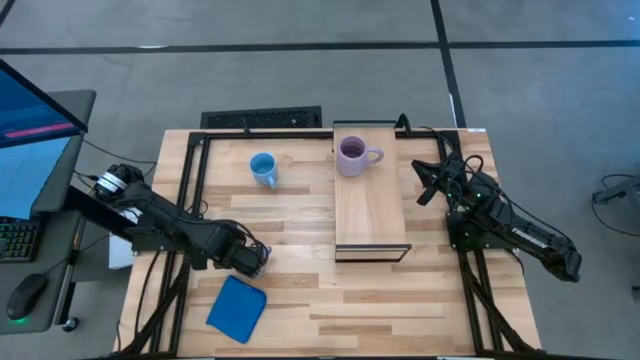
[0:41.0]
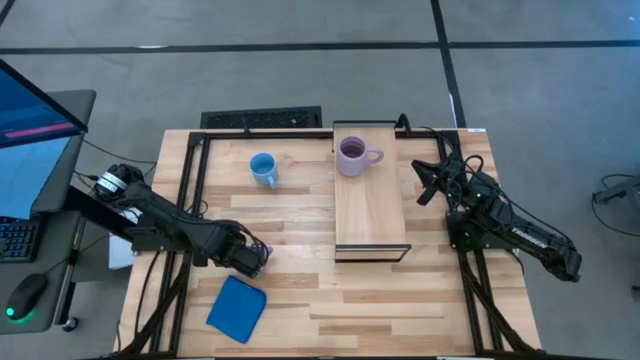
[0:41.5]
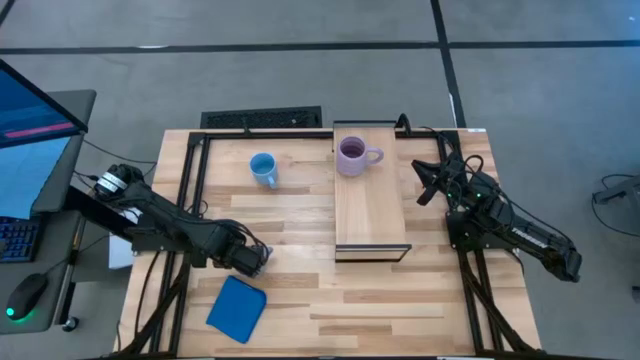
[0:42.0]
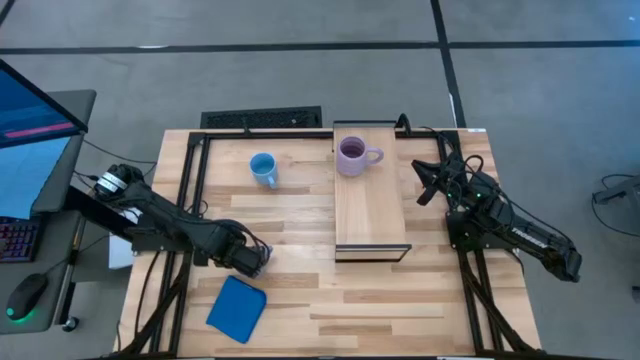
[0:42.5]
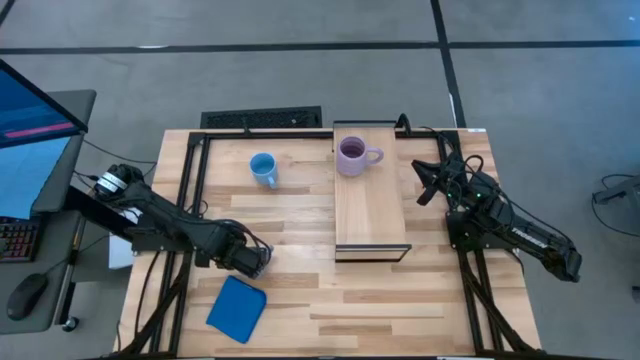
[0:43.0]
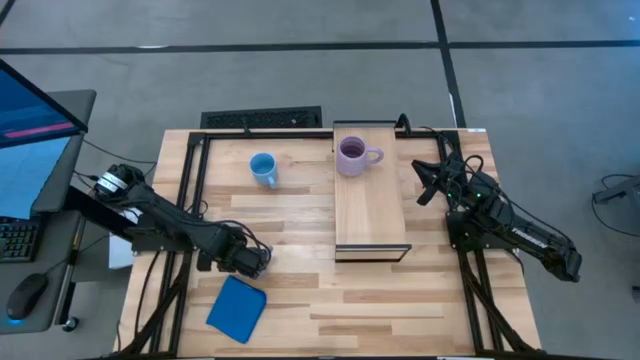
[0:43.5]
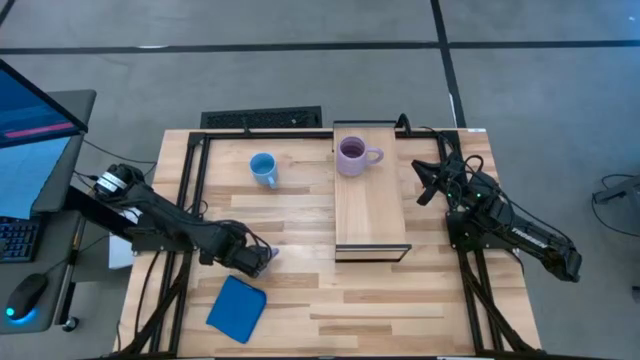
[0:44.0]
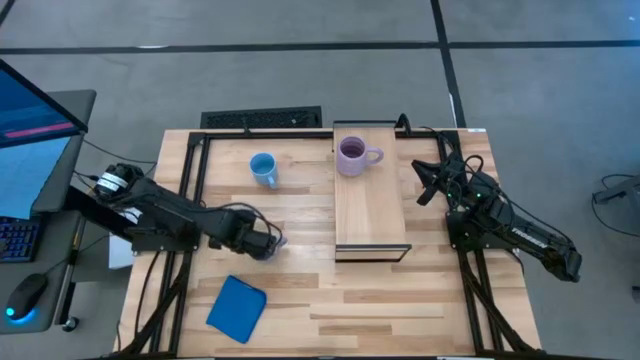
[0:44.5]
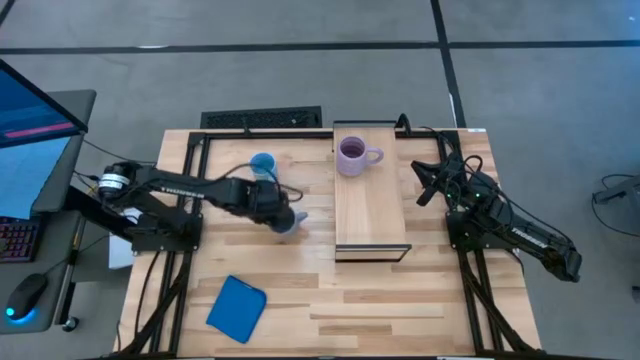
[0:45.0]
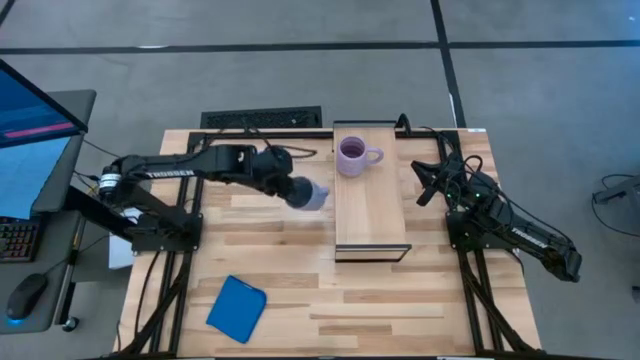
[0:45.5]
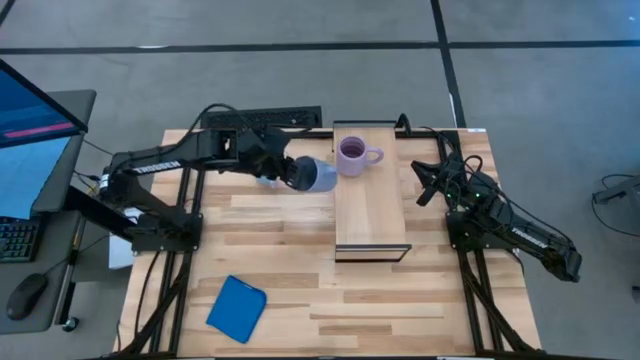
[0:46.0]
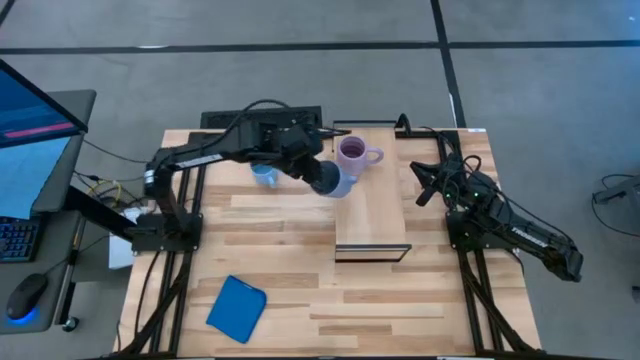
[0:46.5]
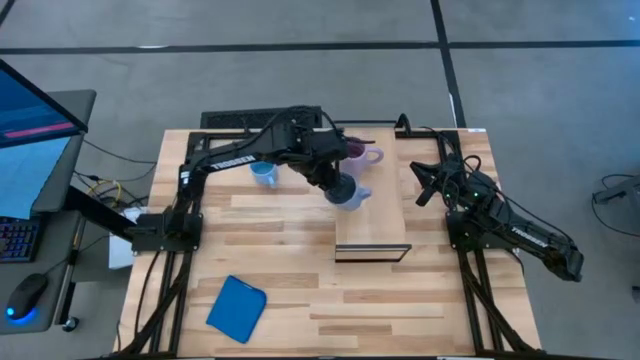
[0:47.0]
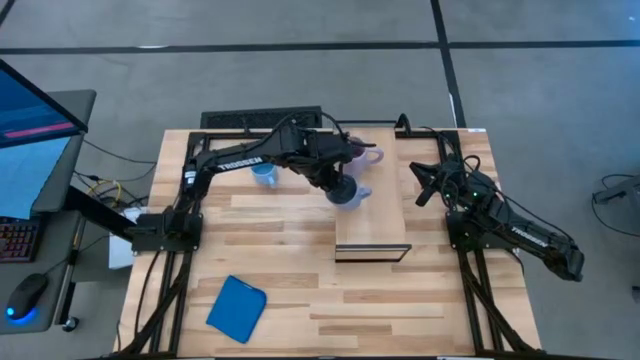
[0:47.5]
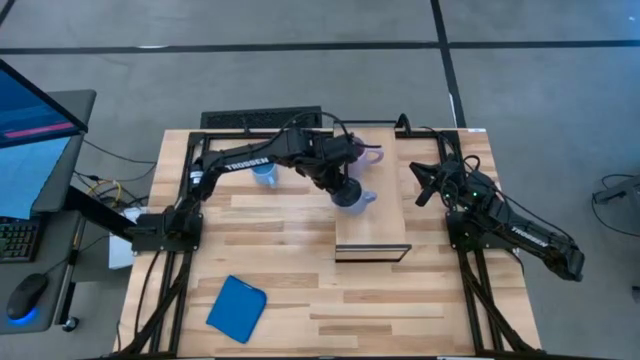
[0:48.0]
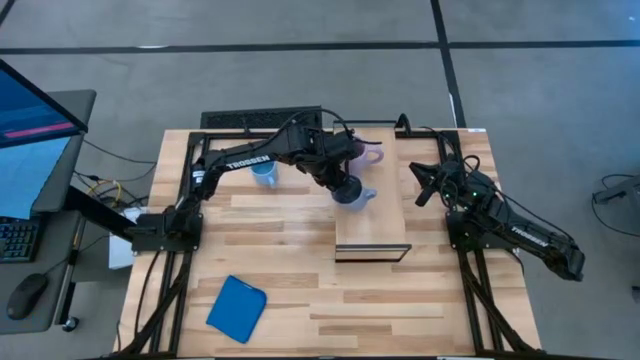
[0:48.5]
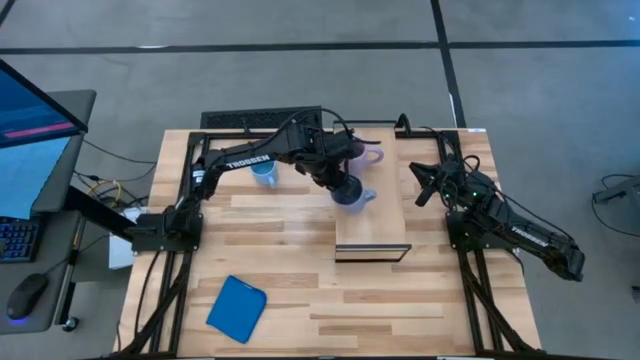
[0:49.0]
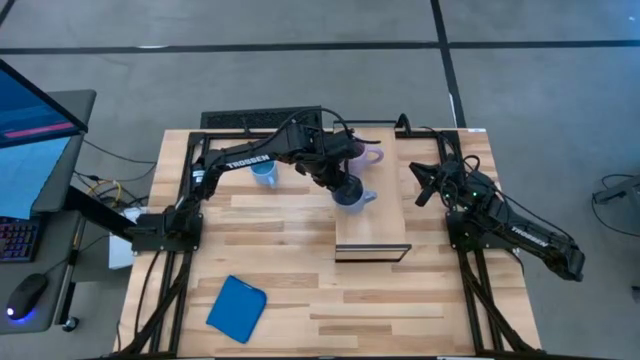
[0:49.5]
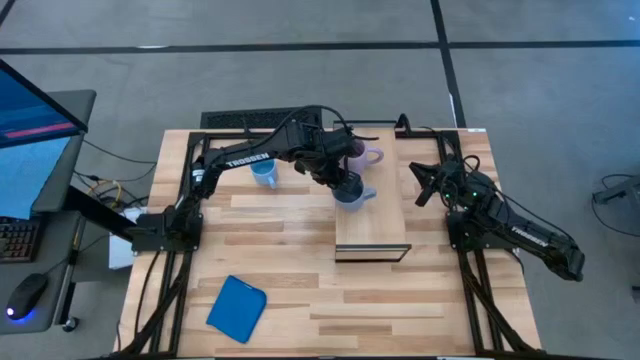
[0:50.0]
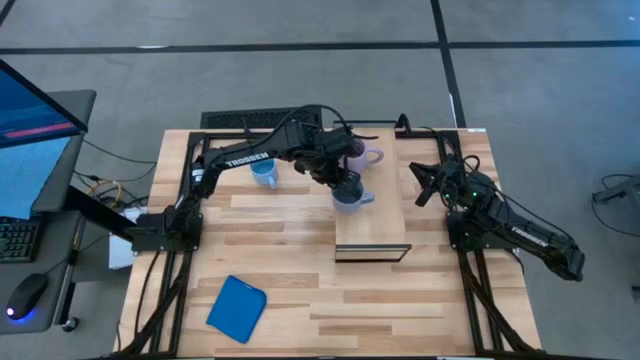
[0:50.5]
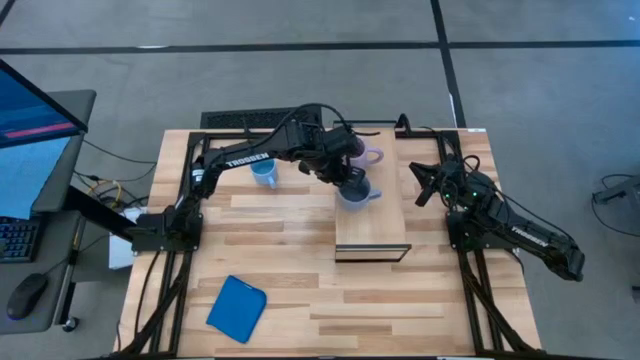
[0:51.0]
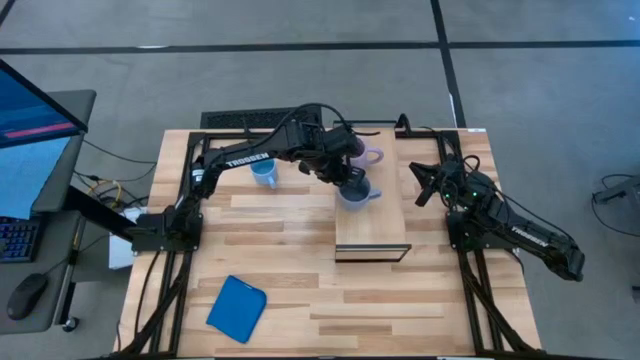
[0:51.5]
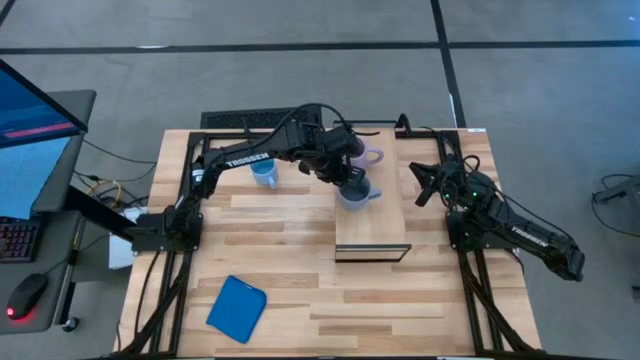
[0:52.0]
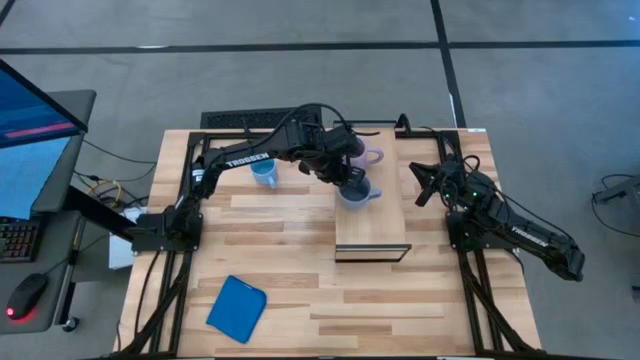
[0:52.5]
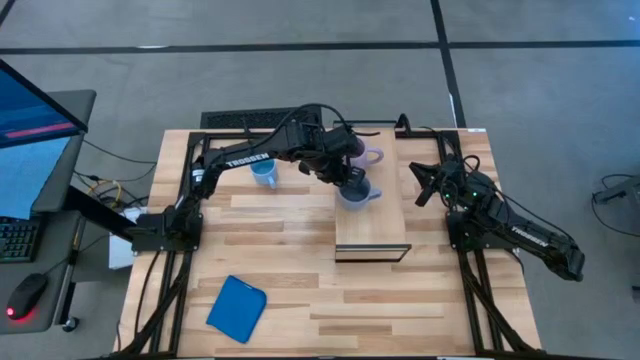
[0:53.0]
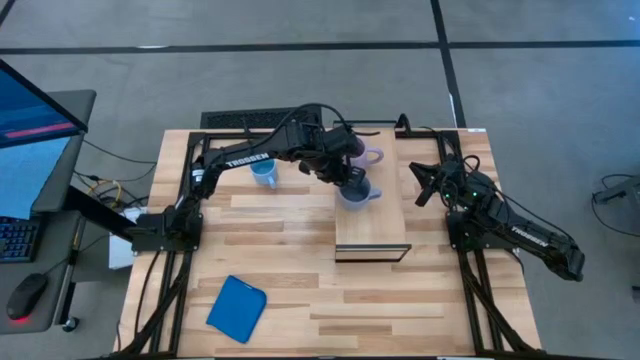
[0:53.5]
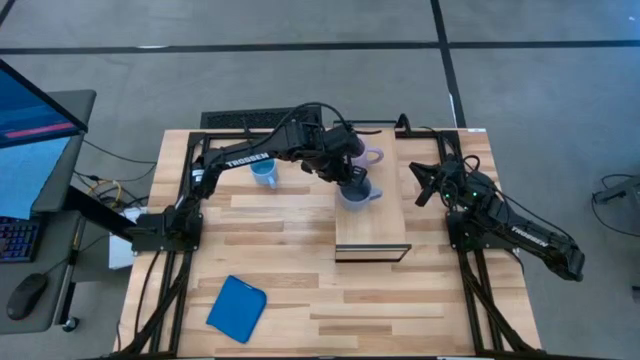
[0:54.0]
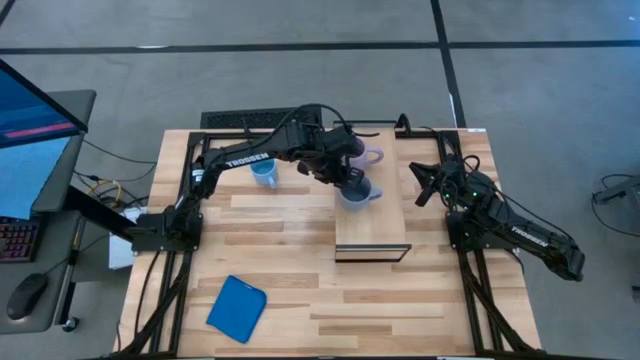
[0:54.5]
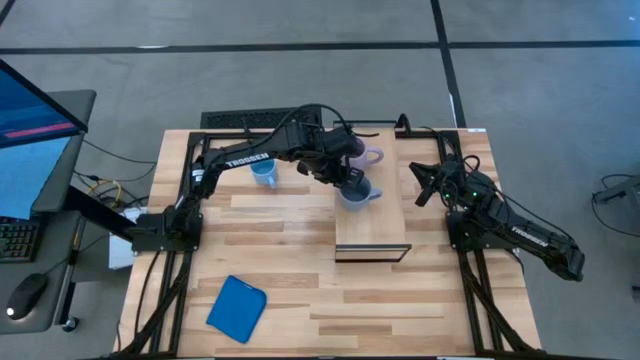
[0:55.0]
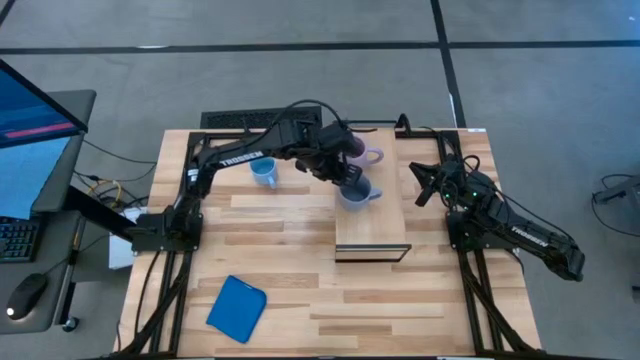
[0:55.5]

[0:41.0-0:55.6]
Task: Stack small to large cups/mugs on shelf
Put the blue mug on the shelf

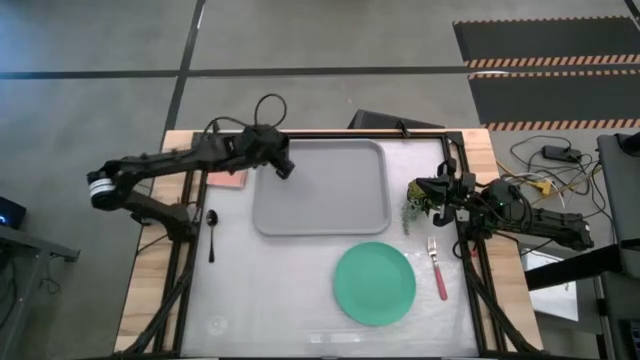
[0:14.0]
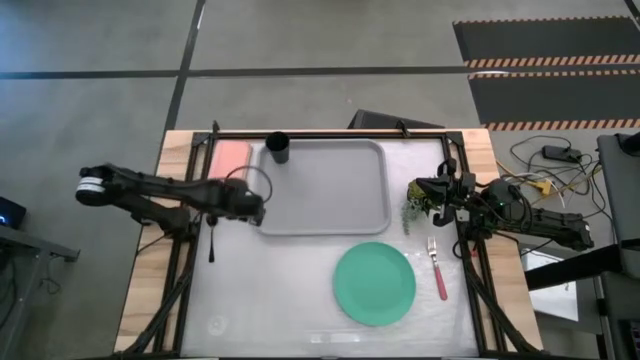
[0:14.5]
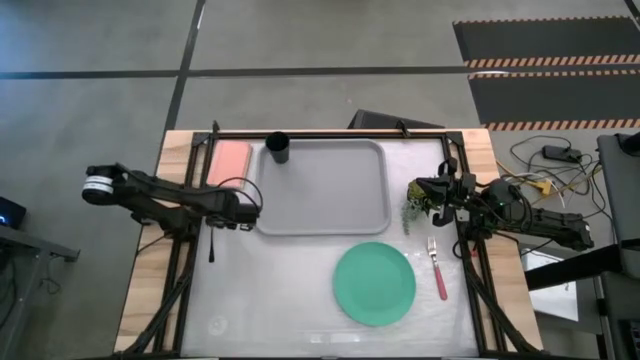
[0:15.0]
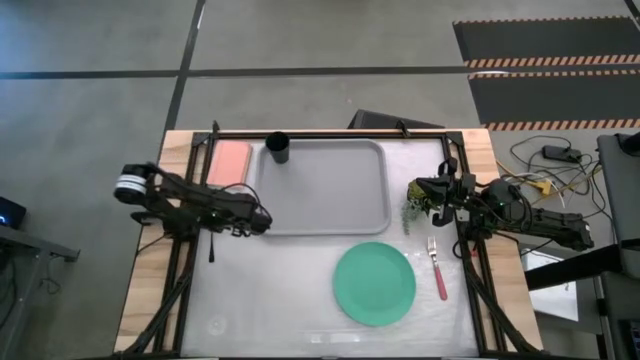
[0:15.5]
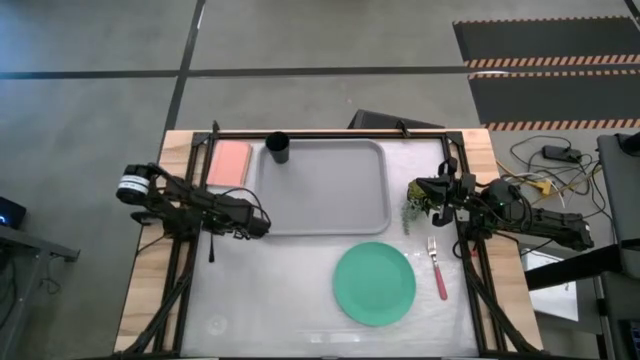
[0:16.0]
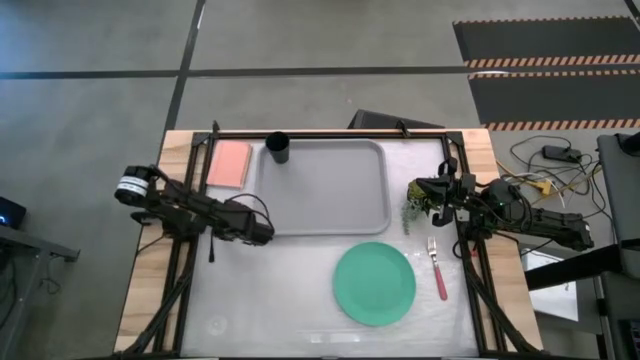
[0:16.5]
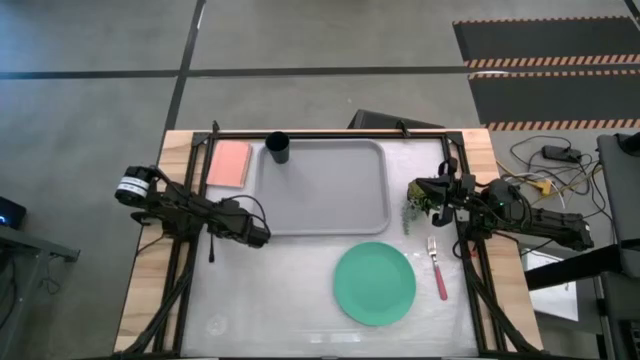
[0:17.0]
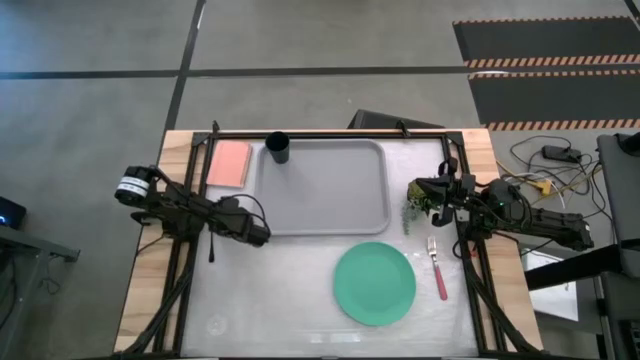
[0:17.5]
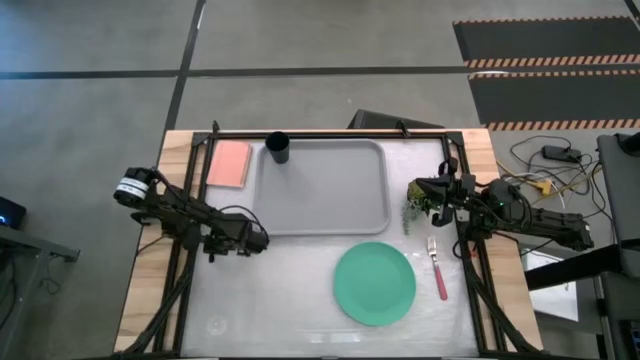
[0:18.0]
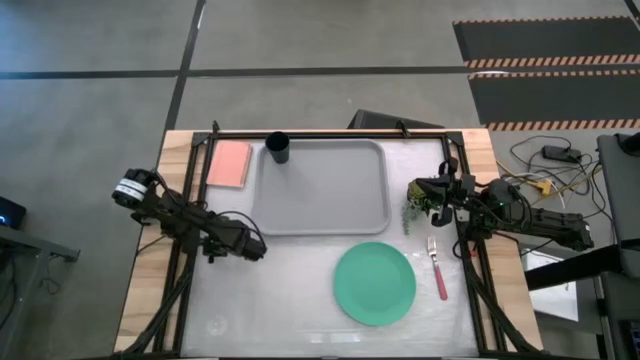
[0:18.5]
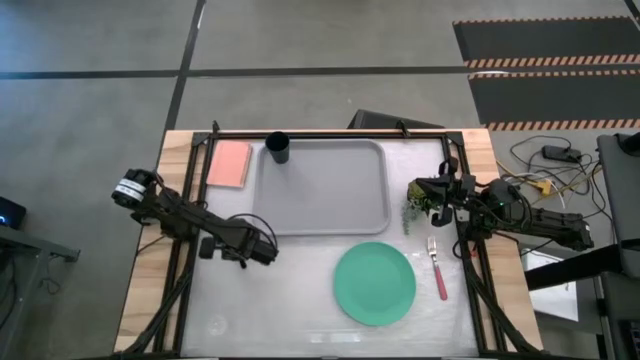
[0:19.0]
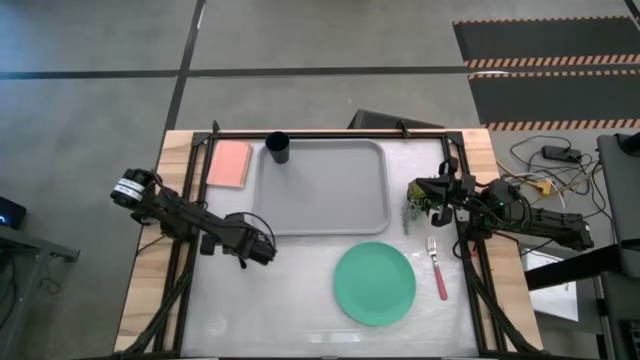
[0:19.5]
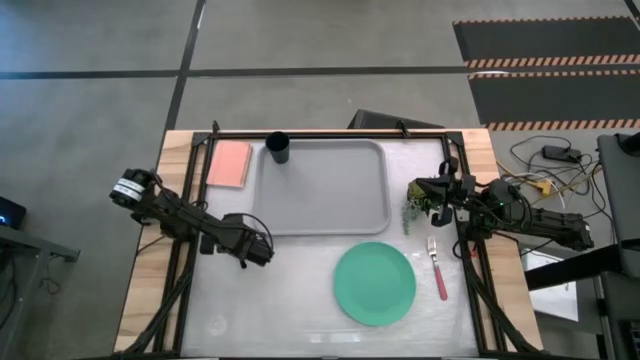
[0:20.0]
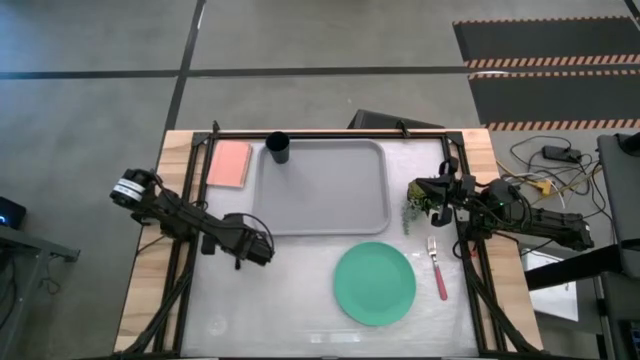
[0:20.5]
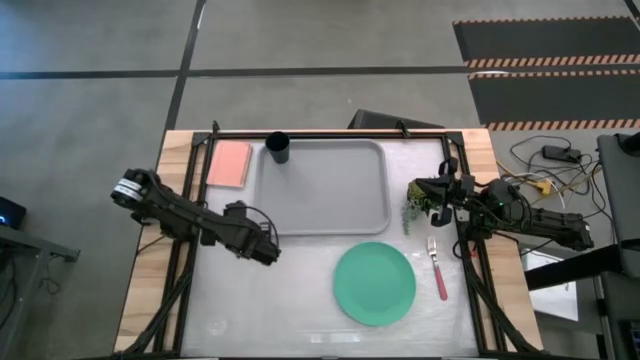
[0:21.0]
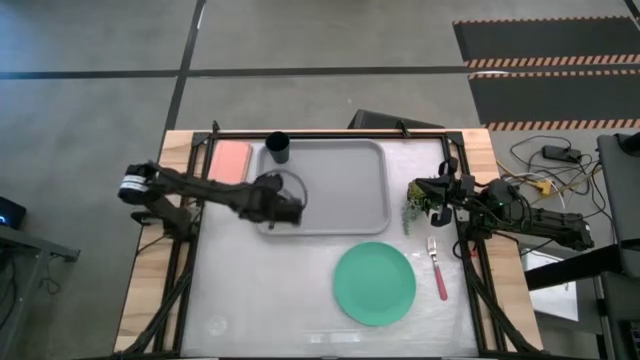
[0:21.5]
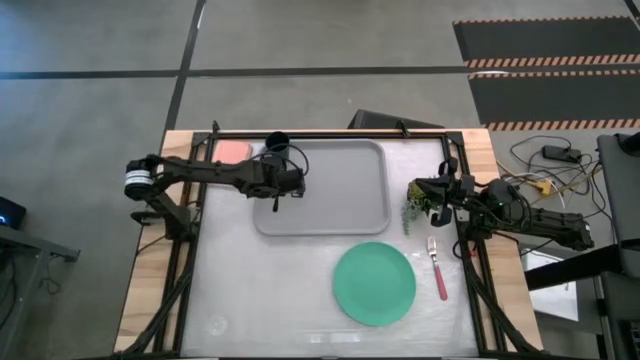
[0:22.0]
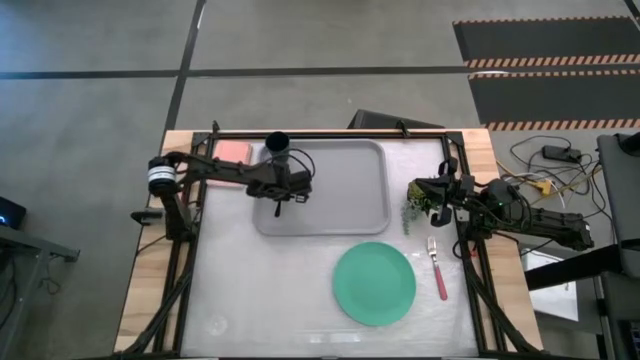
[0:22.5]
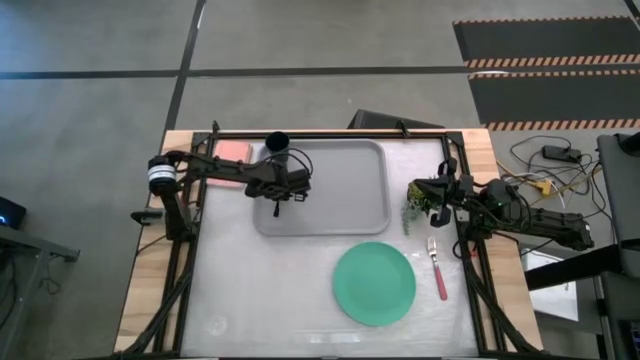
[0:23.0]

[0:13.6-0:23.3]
Task: Pick and place plate/cup/fork/spoon on tray
Put the black spoon on the gray serving tray to the bottom of the black cup
